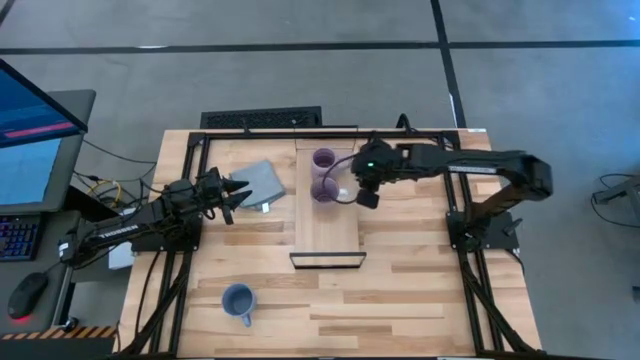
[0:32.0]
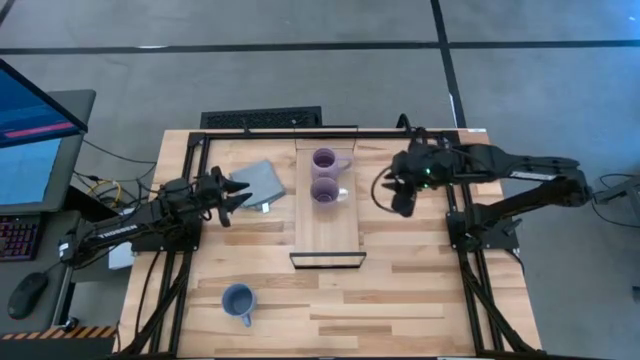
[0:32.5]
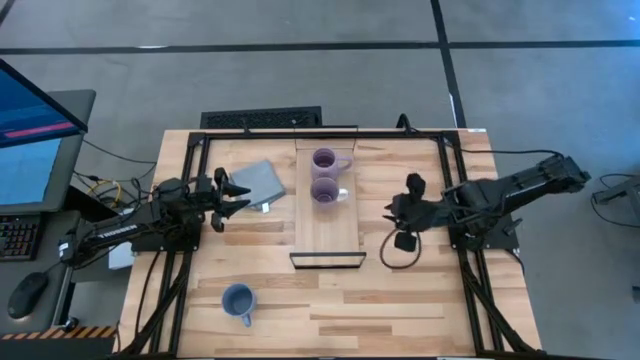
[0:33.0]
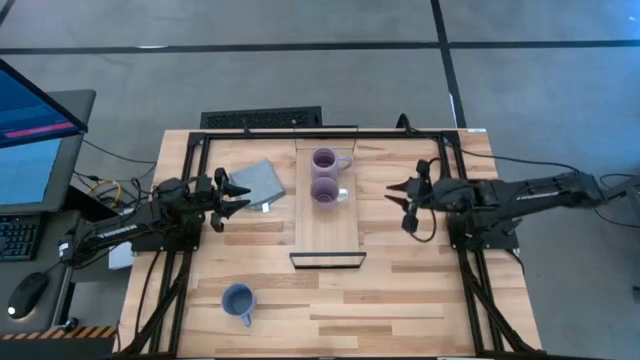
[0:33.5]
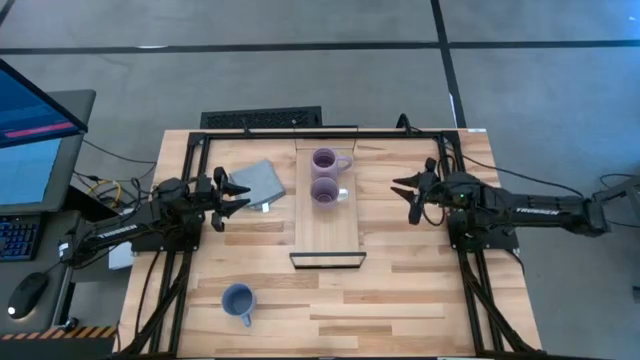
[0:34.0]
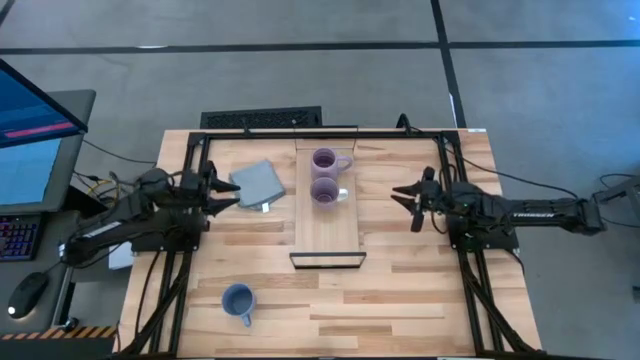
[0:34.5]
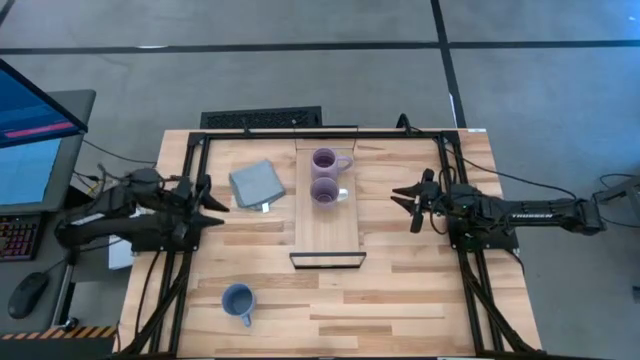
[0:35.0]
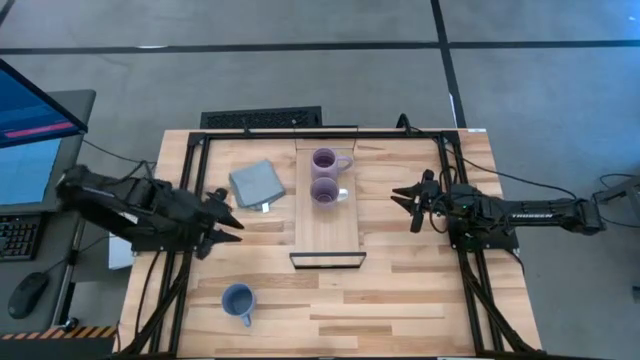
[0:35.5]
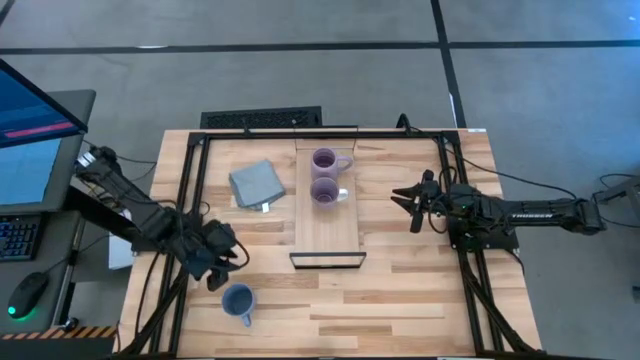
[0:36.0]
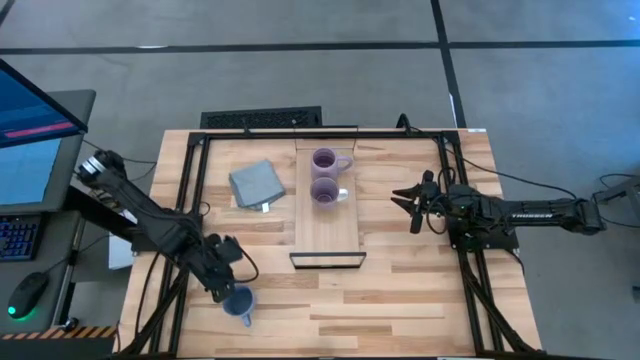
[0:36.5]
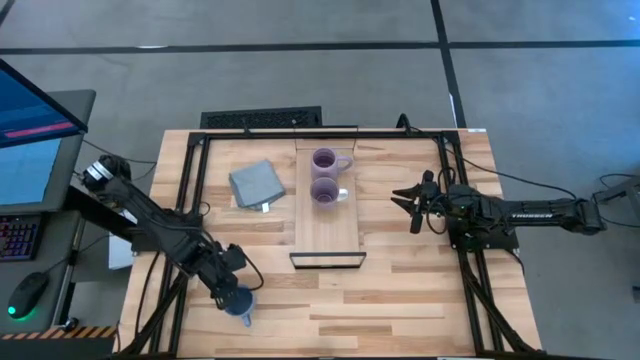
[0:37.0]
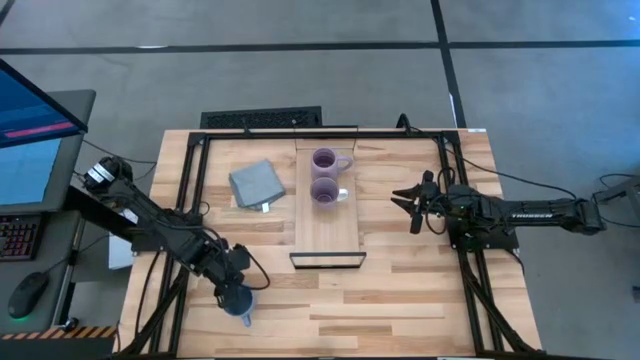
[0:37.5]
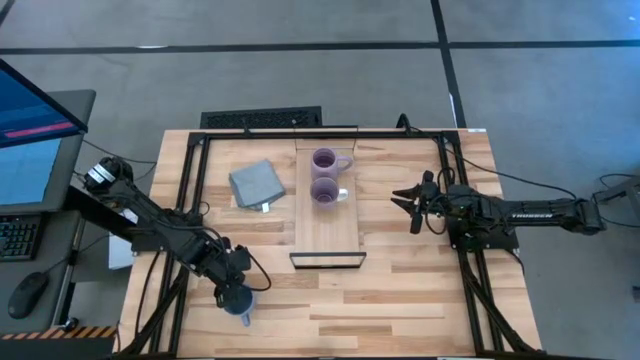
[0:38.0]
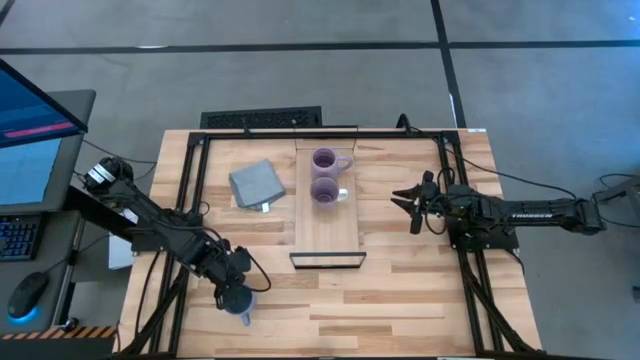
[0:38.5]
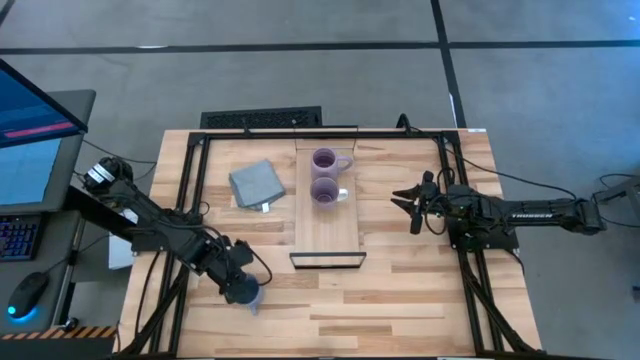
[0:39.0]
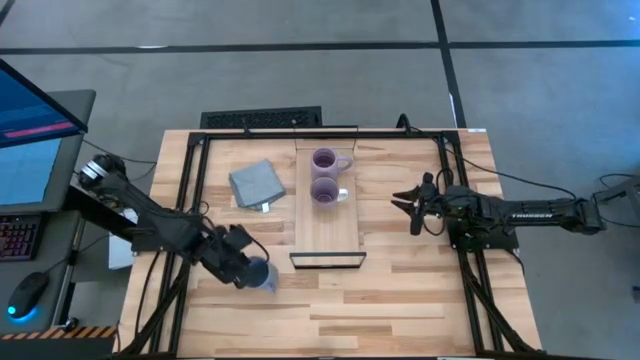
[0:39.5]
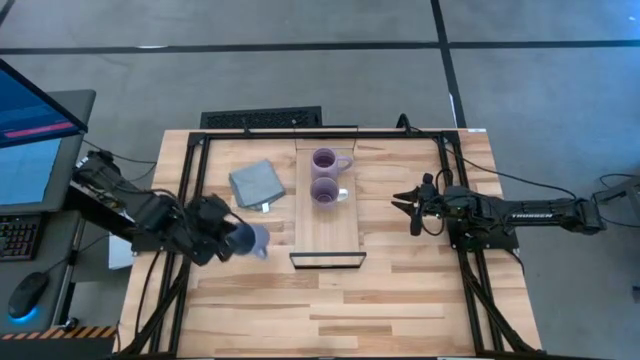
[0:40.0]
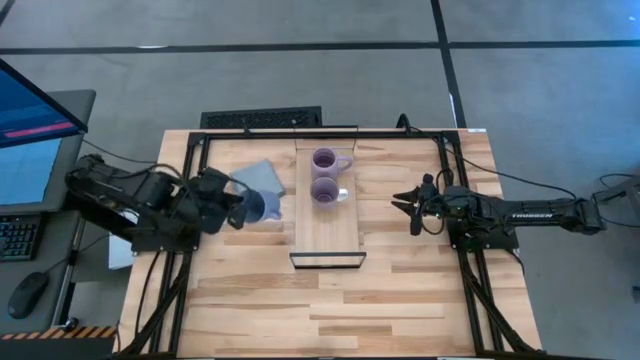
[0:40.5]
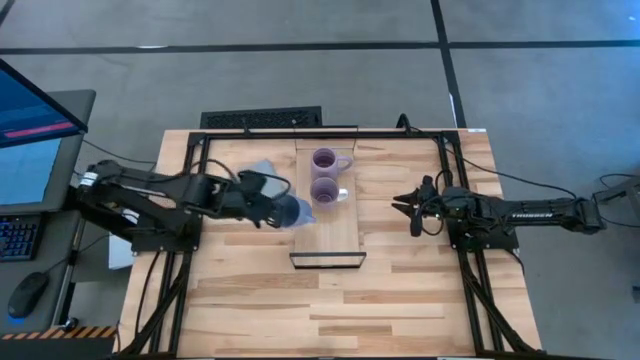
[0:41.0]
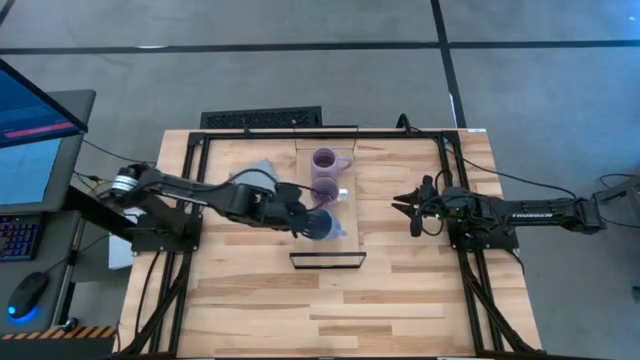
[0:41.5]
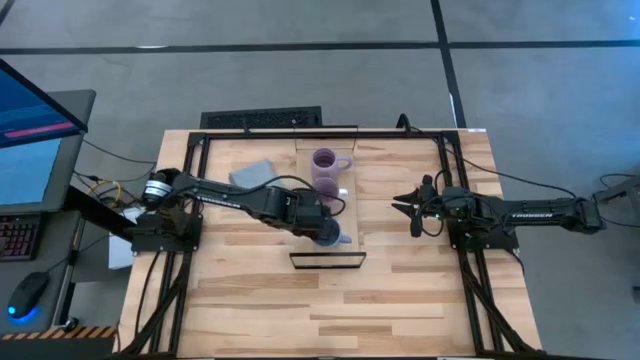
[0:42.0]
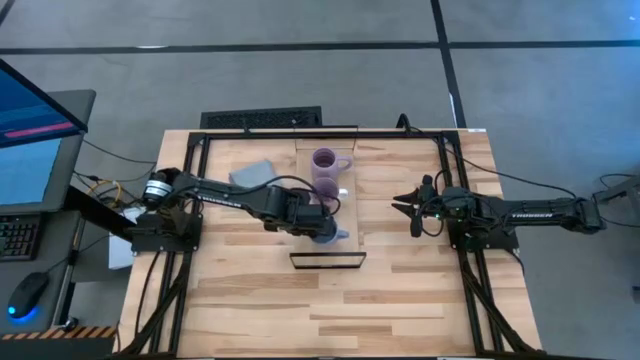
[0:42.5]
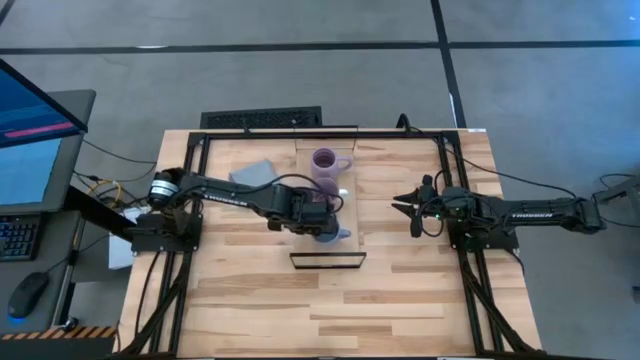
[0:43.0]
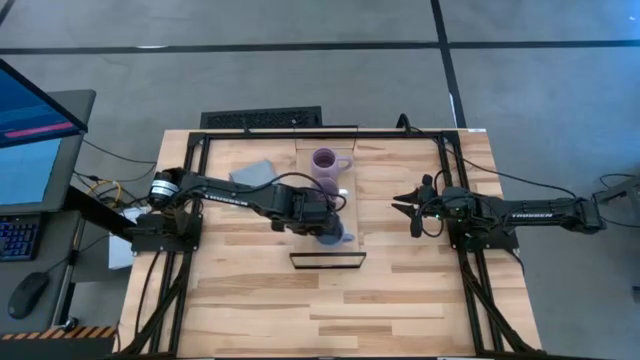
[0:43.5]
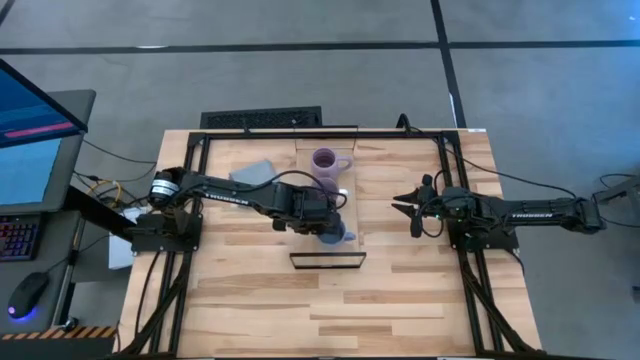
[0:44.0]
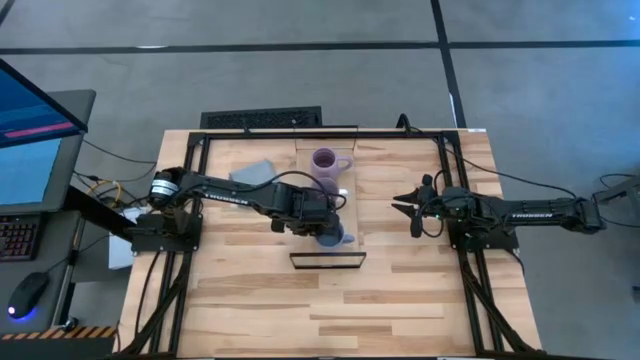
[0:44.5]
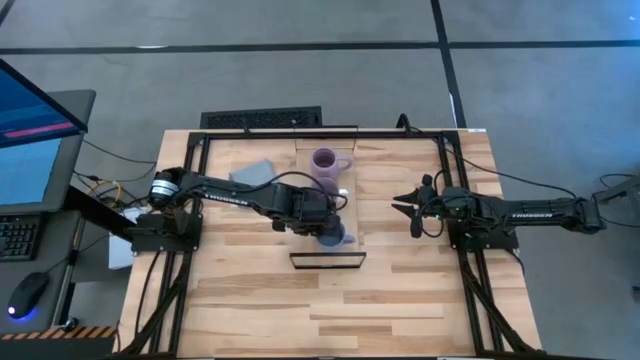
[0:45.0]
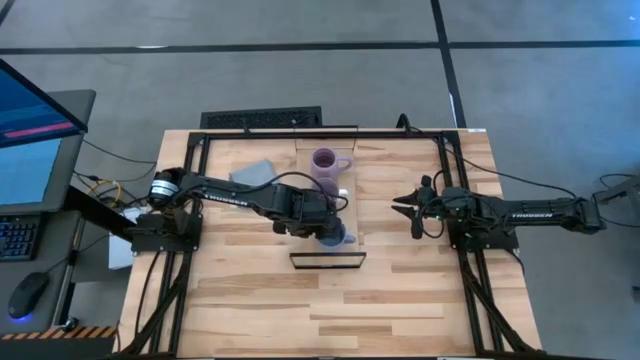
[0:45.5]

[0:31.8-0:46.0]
Task: Stack small to large cups/mugs on shelf
Put the blue mug on the shelf

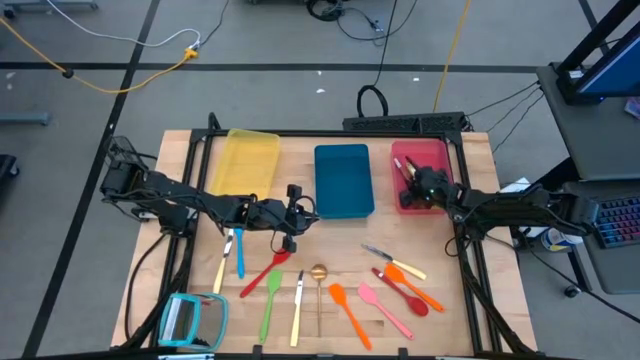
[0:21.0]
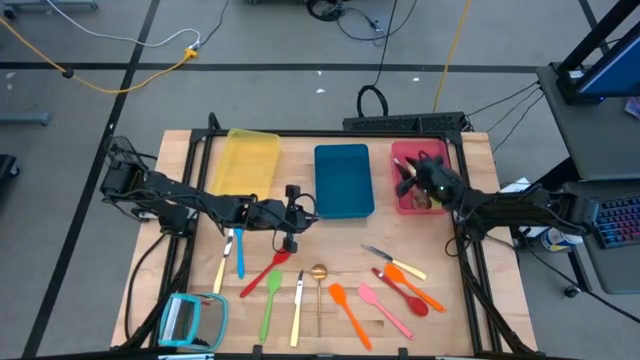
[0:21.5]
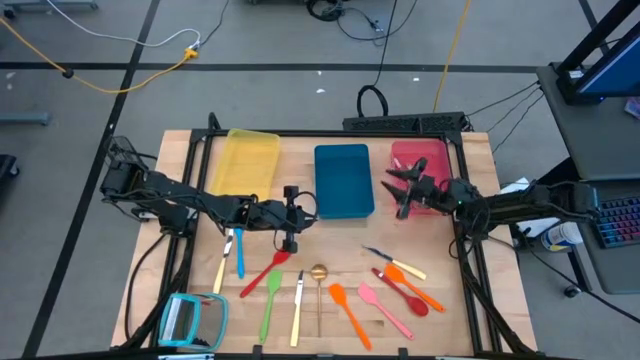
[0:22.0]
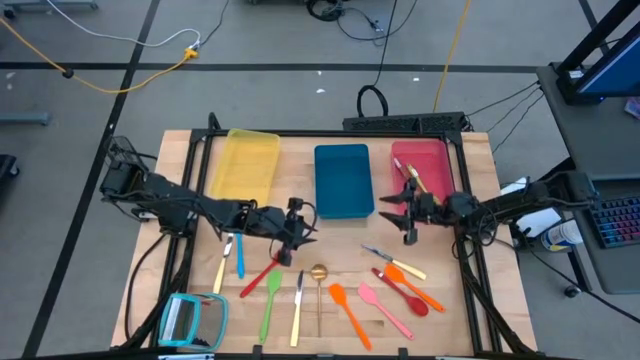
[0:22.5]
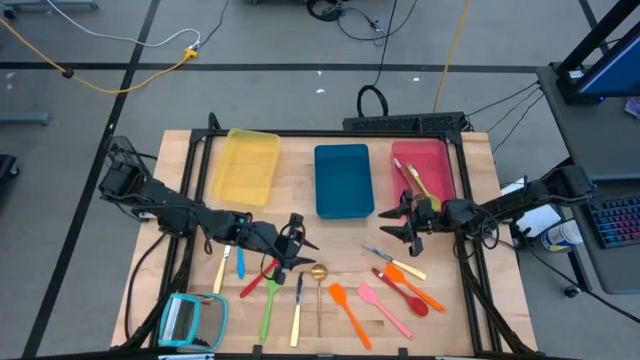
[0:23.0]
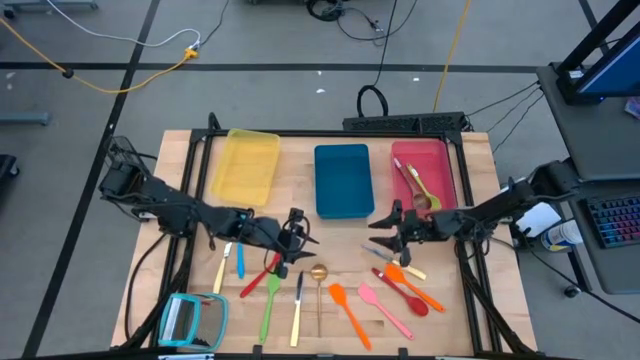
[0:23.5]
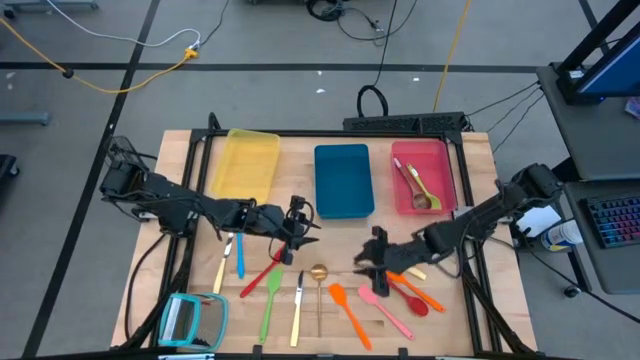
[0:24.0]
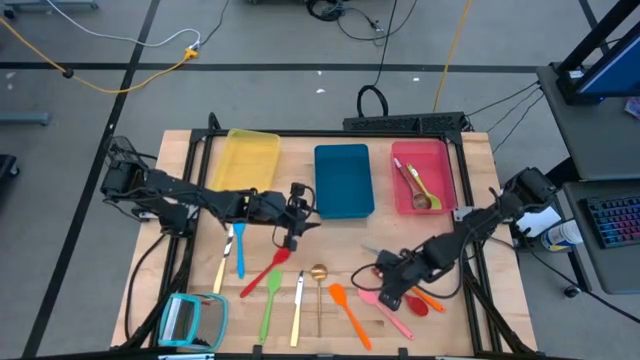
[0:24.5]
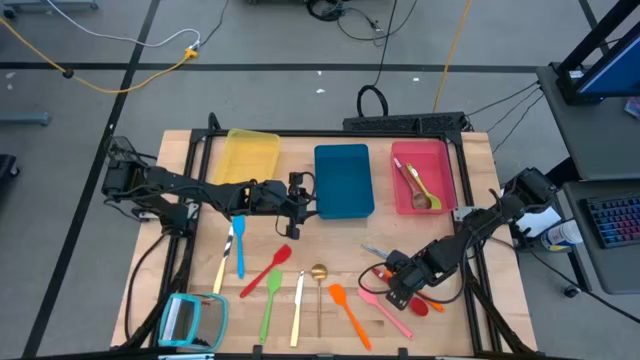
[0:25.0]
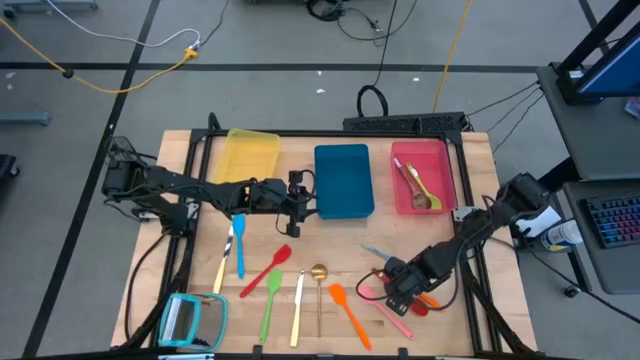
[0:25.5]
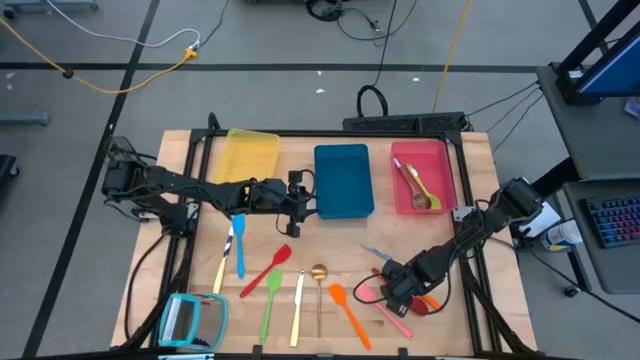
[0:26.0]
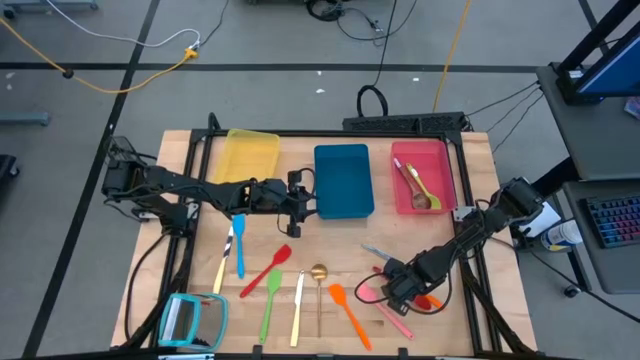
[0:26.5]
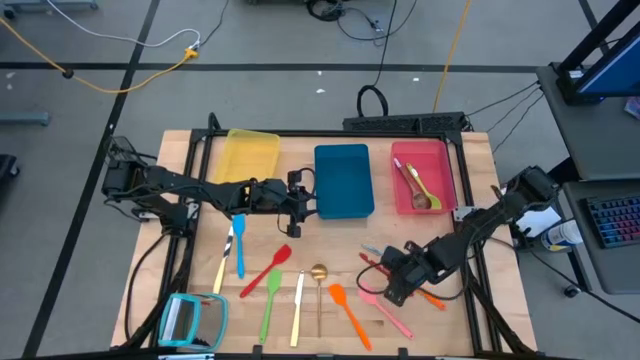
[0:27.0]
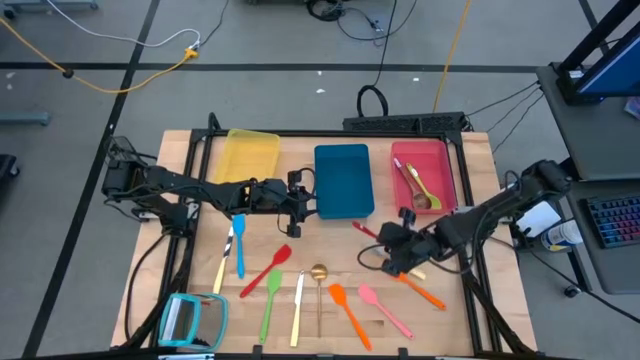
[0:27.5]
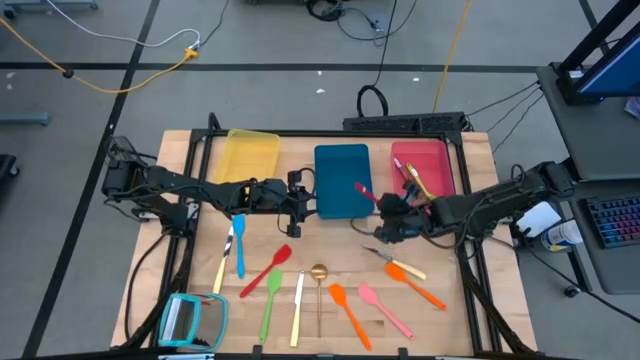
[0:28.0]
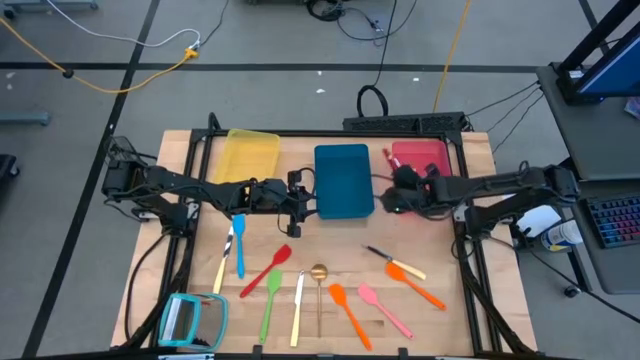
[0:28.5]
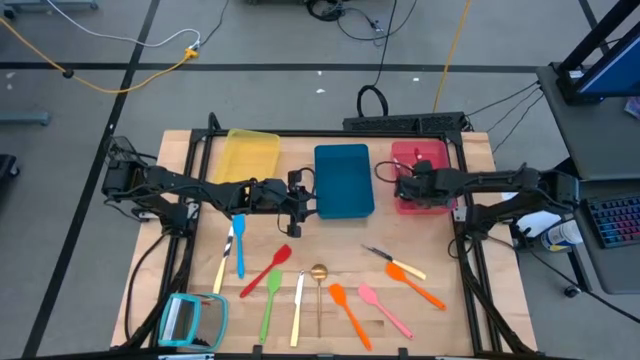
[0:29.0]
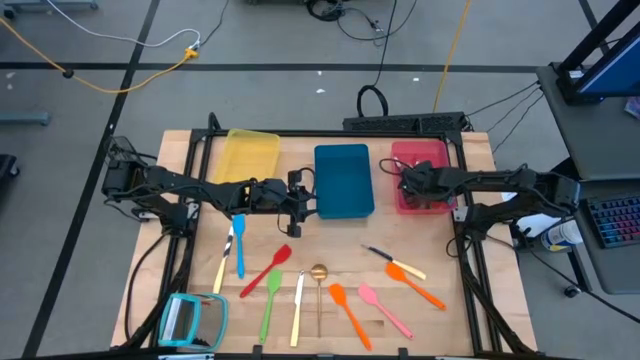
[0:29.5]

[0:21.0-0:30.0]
Task: Pick & Place Kitchen Items
Put the red serving spoon into the red bin
